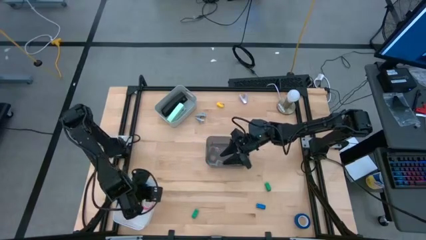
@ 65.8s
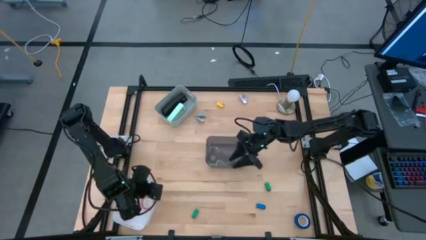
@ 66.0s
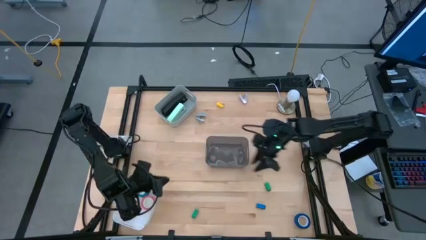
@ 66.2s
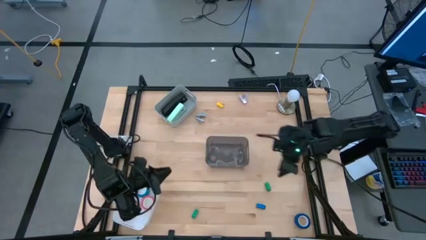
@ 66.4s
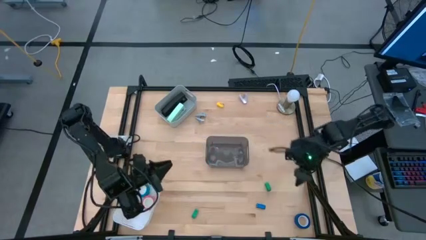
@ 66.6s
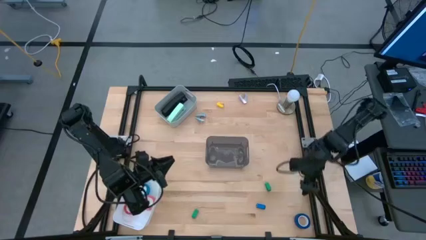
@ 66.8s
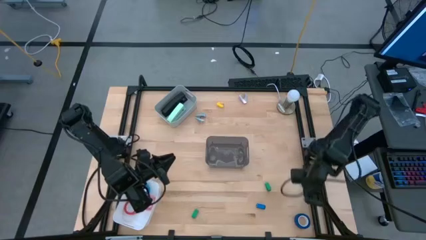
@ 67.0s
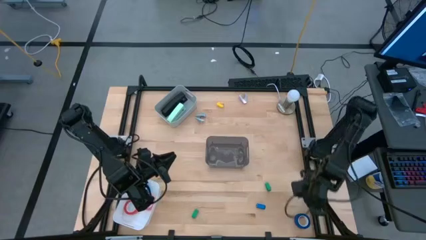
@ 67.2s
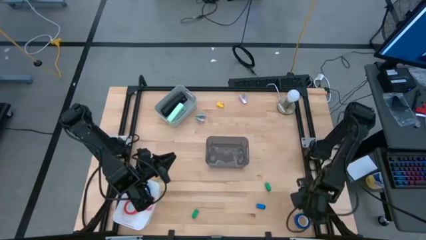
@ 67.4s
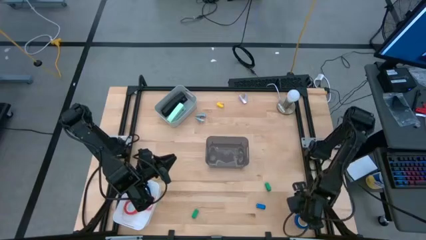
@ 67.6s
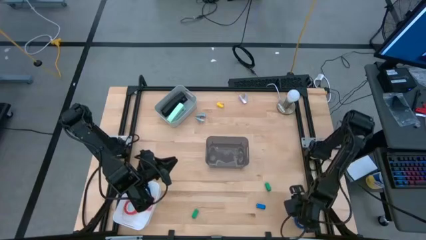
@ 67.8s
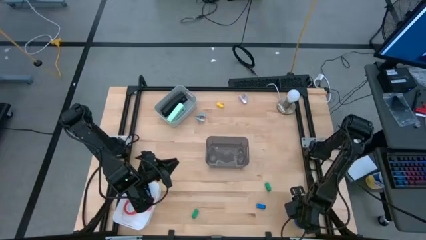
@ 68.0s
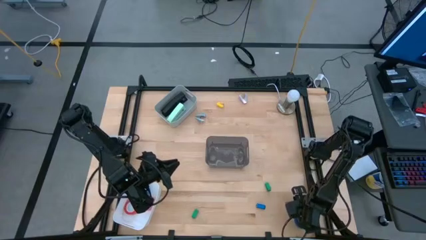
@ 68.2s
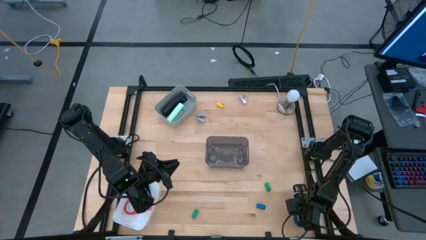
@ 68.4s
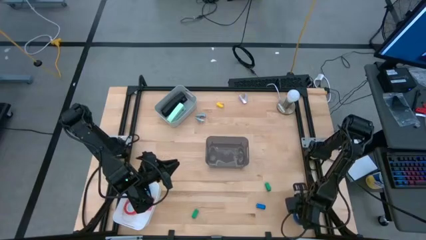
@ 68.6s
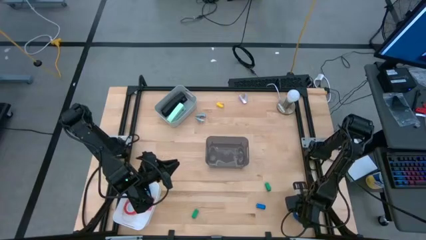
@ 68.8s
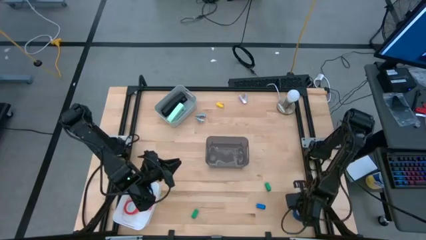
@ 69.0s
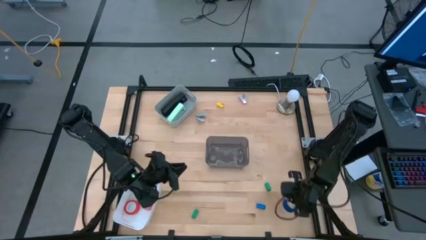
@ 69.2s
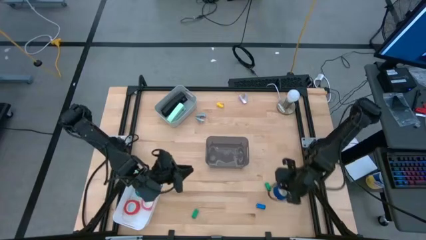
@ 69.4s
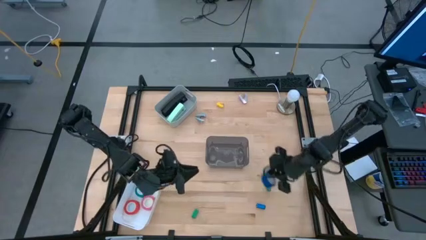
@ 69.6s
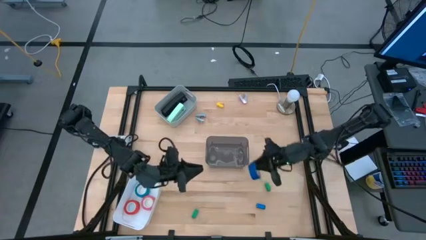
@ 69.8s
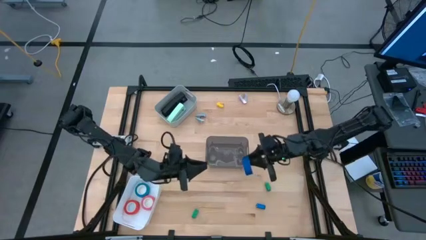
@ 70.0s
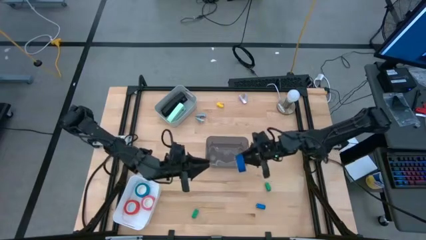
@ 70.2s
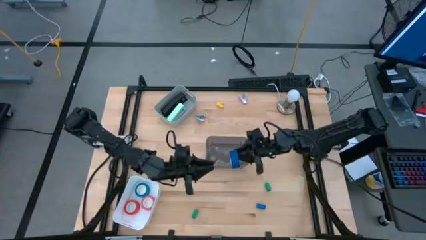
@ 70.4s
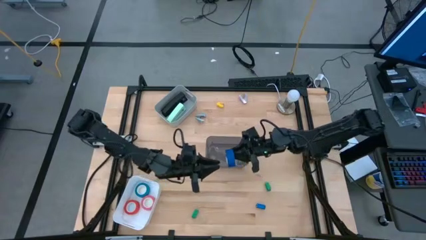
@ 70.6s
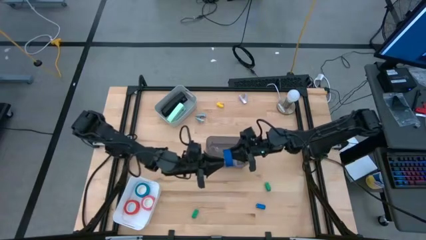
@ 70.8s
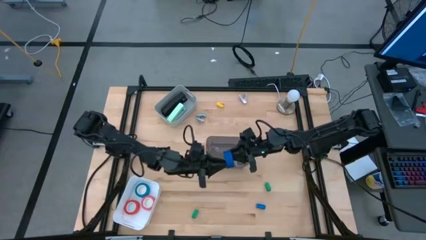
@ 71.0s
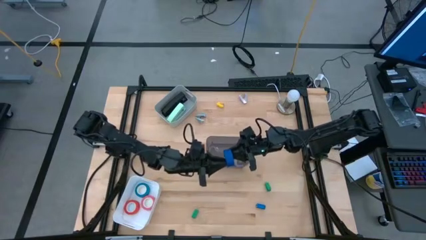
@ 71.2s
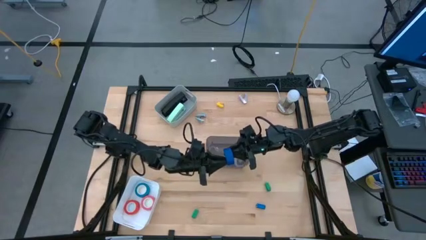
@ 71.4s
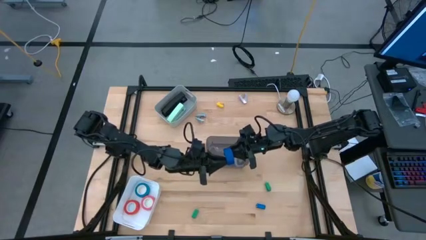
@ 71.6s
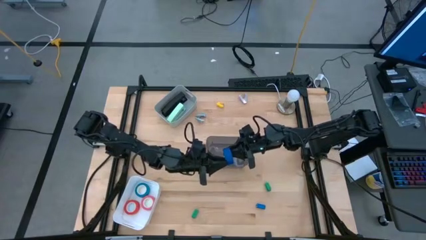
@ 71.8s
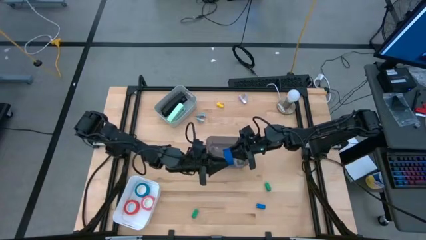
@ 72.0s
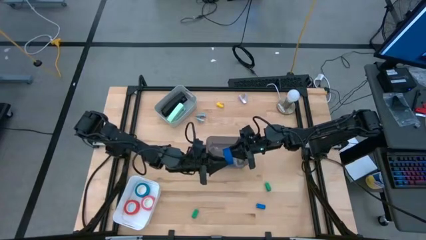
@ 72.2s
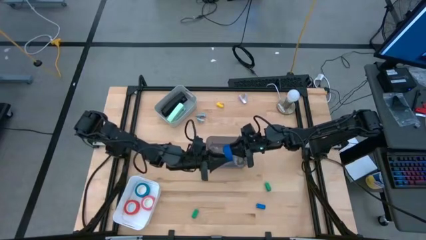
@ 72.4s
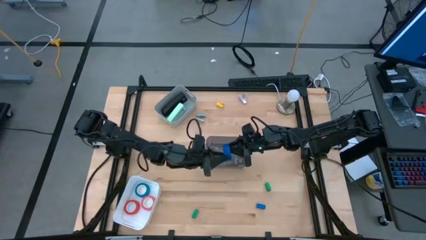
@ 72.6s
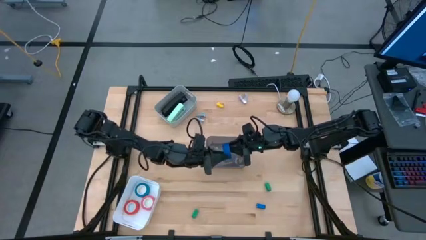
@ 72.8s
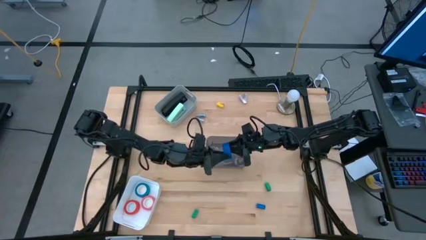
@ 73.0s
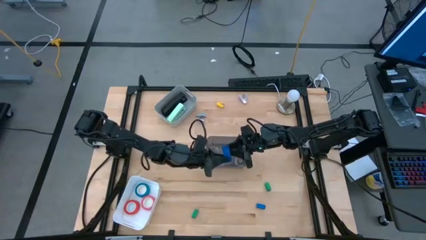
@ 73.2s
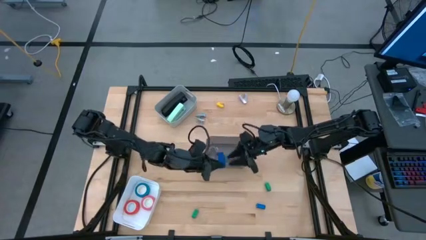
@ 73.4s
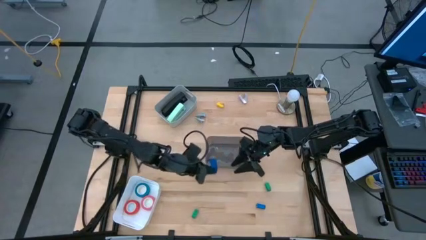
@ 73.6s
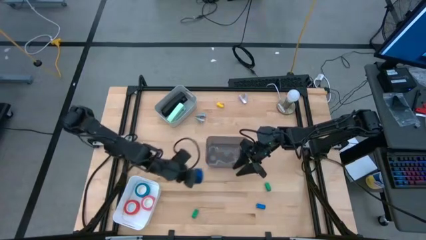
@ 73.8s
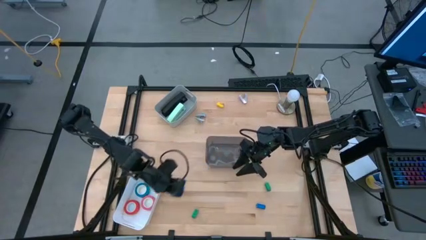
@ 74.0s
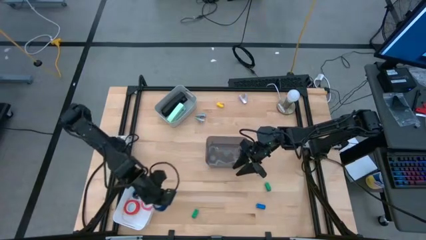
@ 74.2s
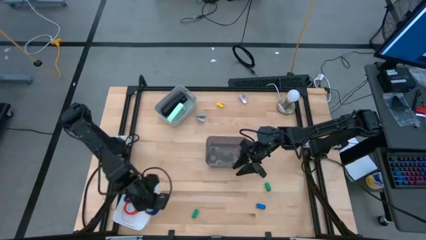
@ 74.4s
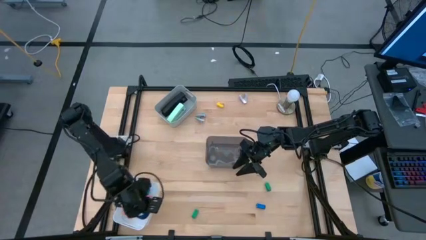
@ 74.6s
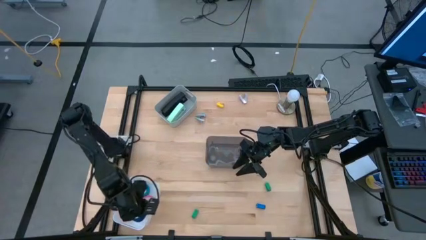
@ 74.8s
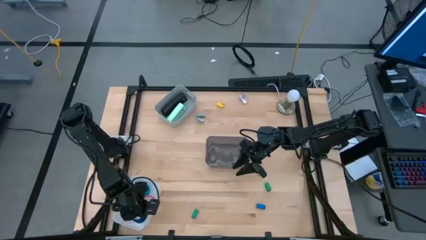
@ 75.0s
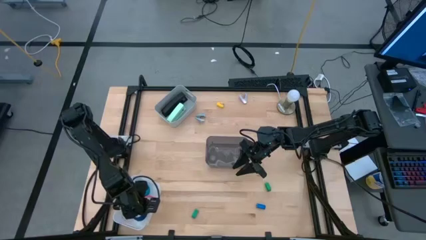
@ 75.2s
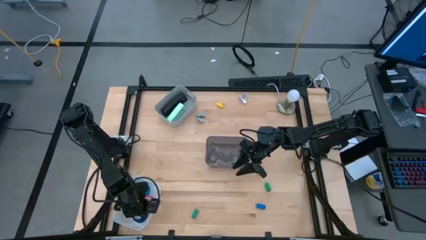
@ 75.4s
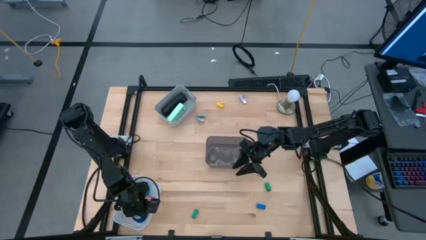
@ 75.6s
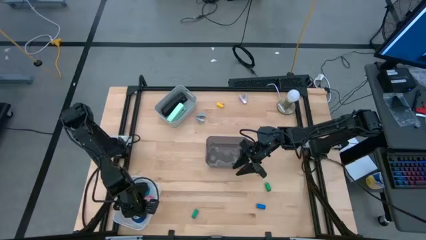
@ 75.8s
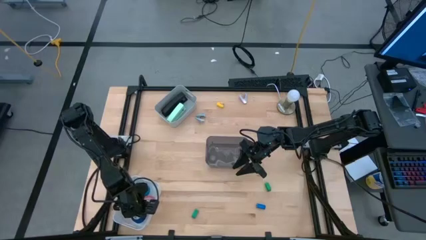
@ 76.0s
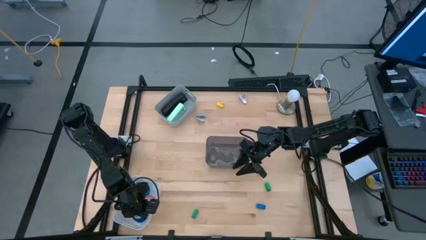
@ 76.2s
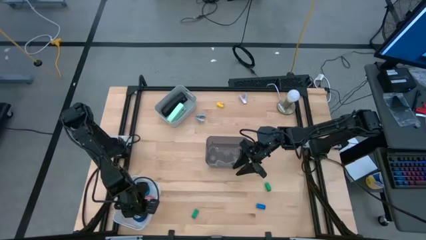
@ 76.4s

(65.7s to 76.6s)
Task: Pick and place Stapler, Stapler remover, tape
Put the dark blue tape into the white bin

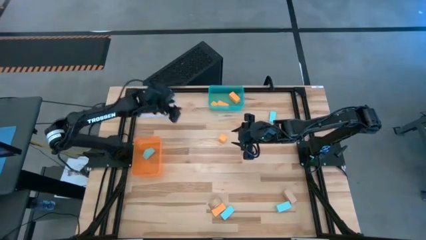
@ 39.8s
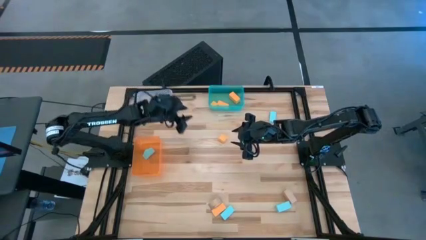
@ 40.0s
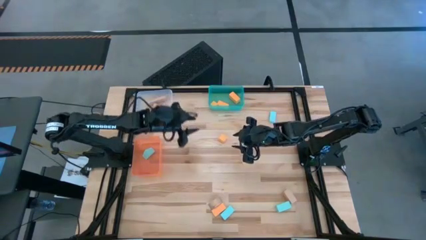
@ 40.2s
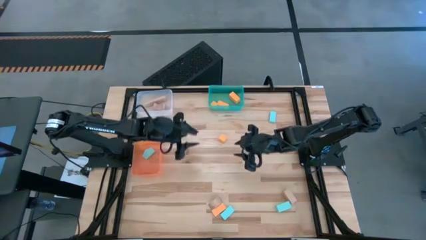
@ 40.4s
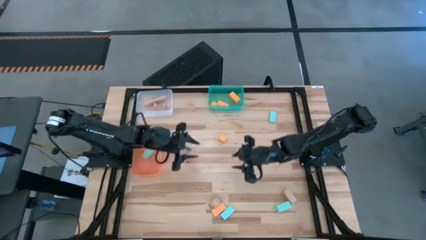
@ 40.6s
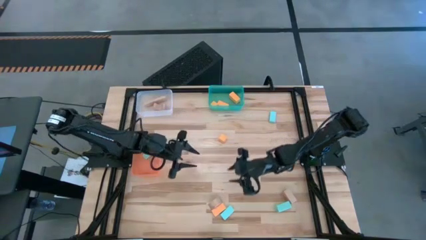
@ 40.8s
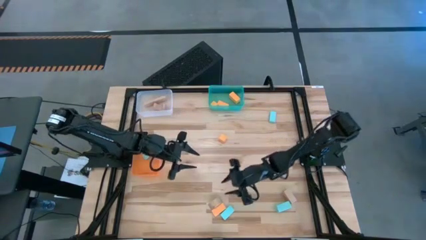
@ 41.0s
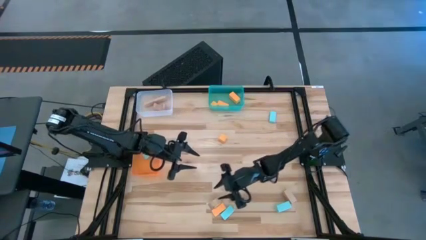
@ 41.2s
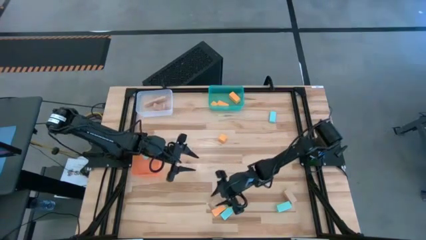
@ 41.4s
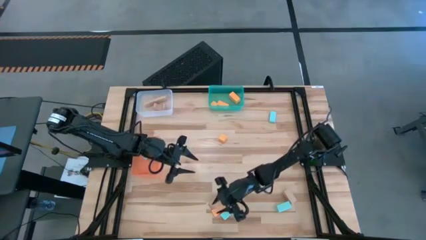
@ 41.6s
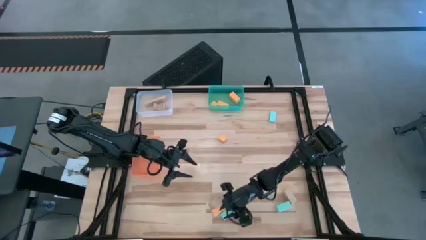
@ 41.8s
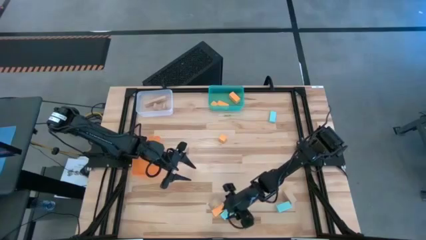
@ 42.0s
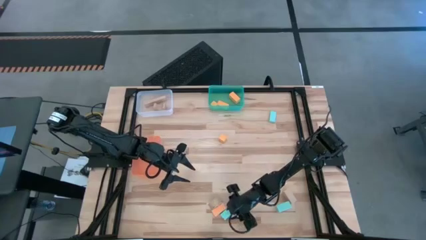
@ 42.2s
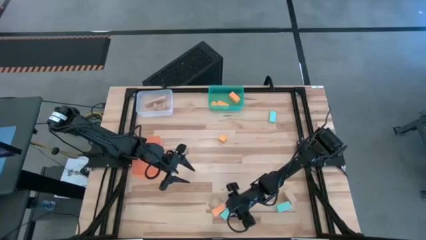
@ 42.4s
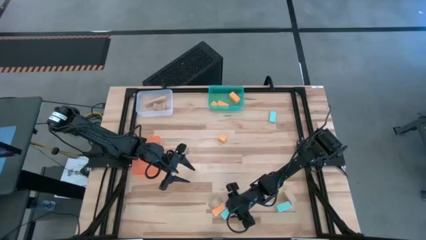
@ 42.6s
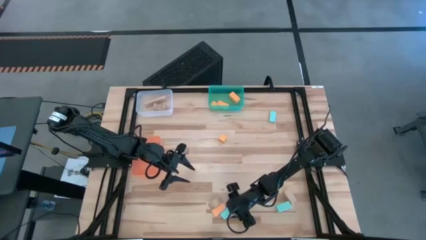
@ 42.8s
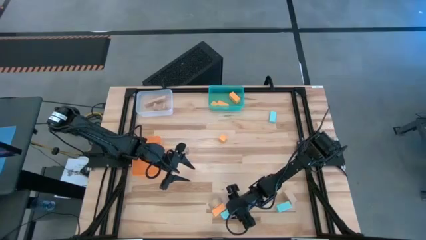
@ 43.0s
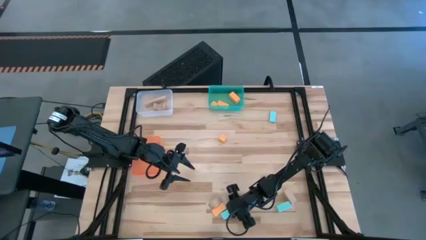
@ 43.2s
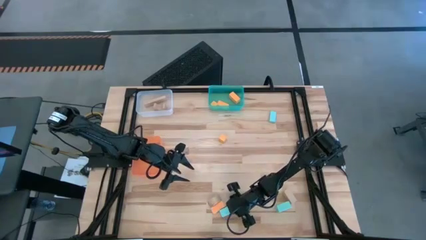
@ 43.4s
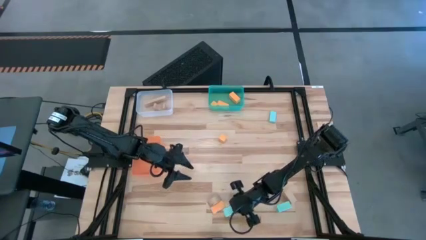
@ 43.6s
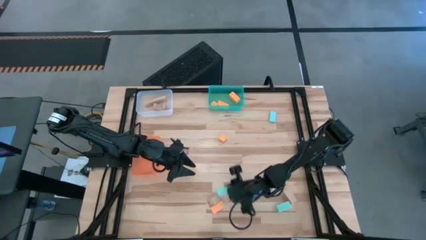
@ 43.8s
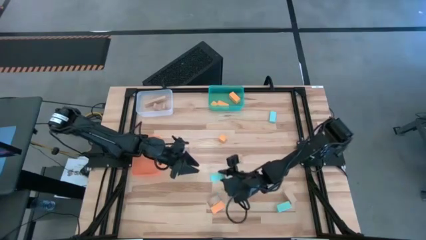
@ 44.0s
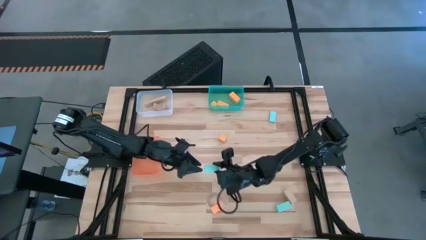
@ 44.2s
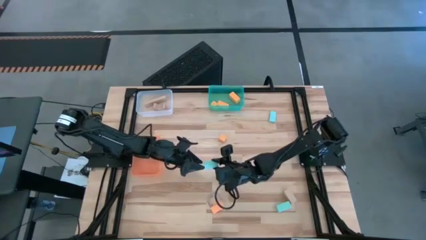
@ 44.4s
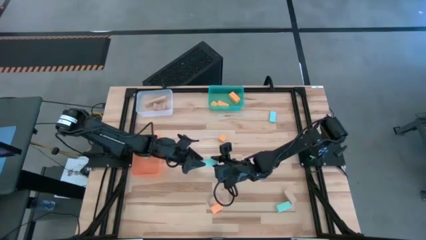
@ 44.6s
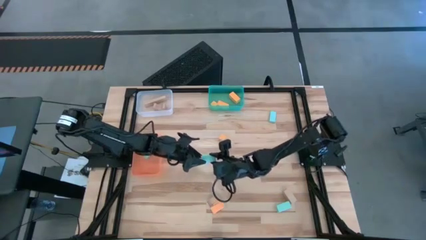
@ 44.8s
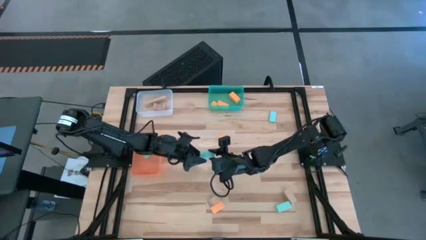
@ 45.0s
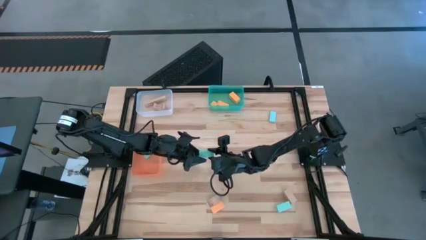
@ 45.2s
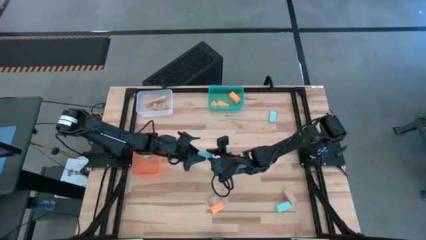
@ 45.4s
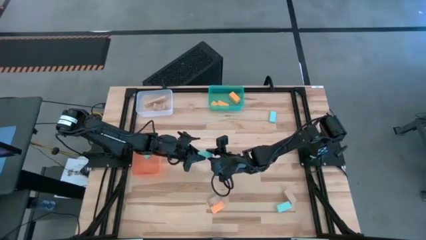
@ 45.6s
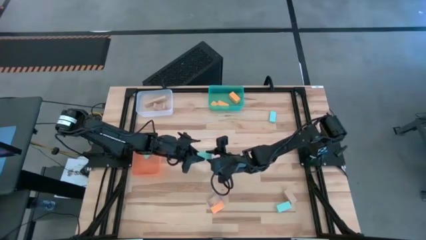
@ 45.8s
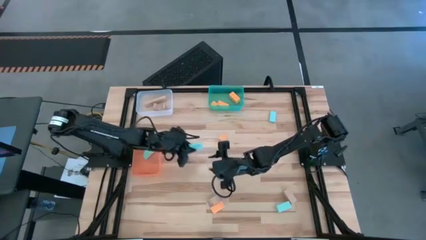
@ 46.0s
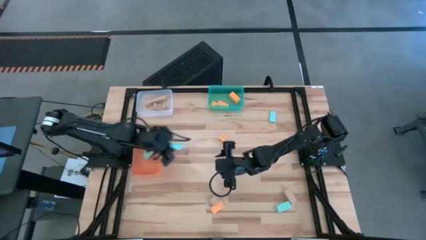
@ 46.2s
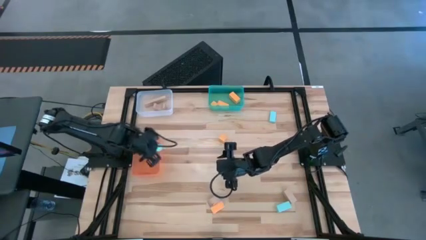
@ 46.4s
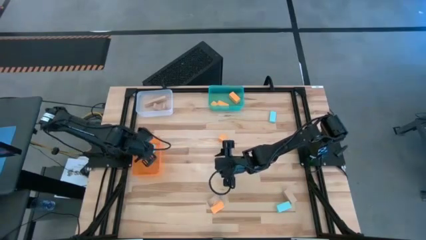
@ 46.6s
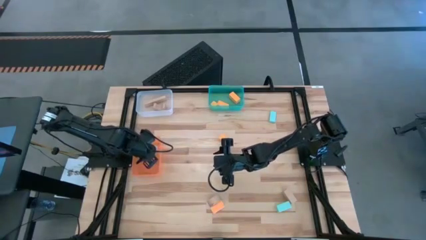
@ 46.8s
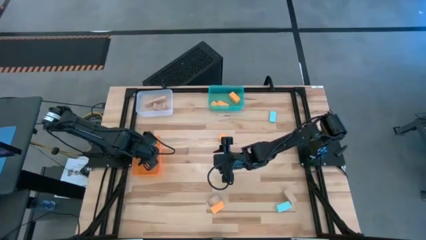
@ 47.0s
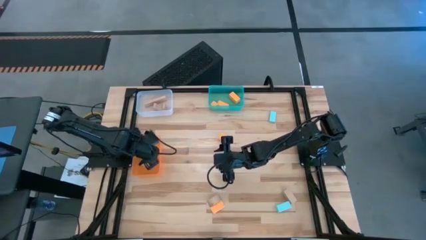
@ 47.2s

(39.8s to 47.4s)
Task: Sort & place blocks by color
Put the blue block into the orange bin
